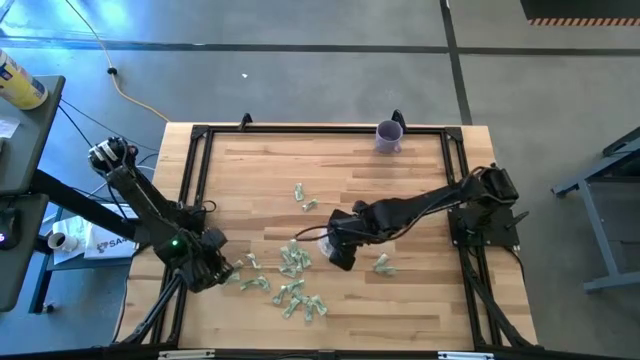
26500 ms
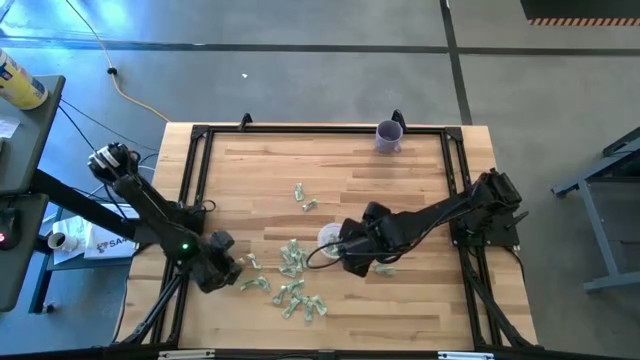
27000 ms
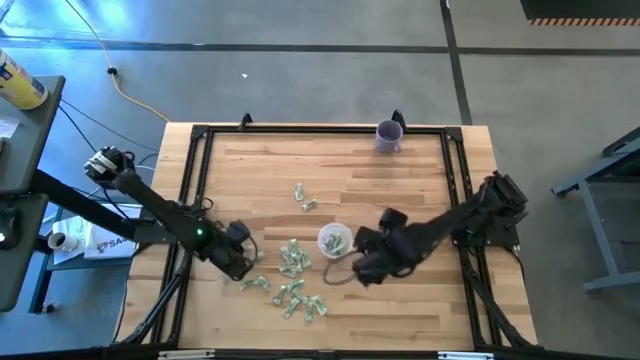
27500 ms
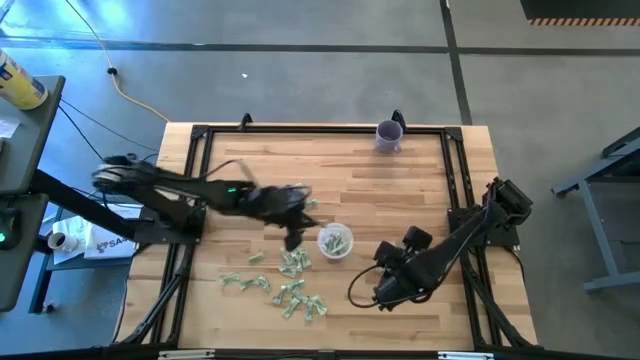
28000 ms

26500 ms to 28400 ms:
Task: Pick and place Stevia / Truvia into bins
Put the stevia packet into the bin

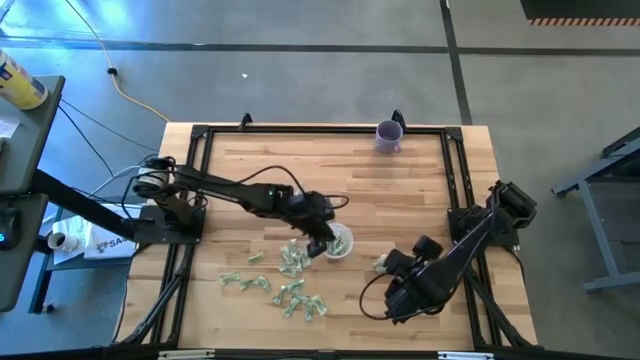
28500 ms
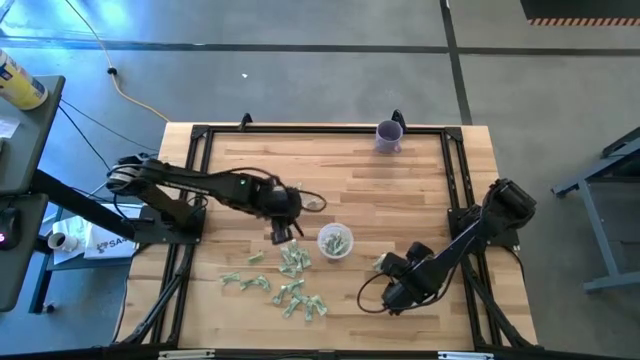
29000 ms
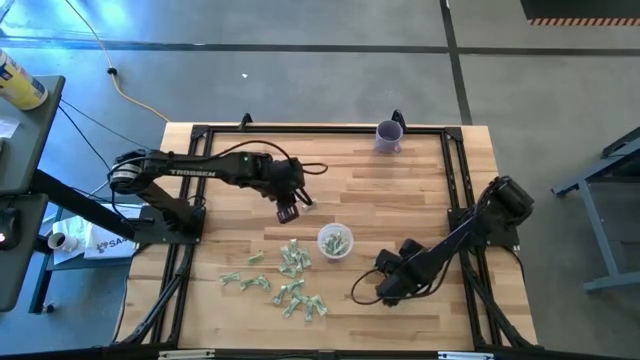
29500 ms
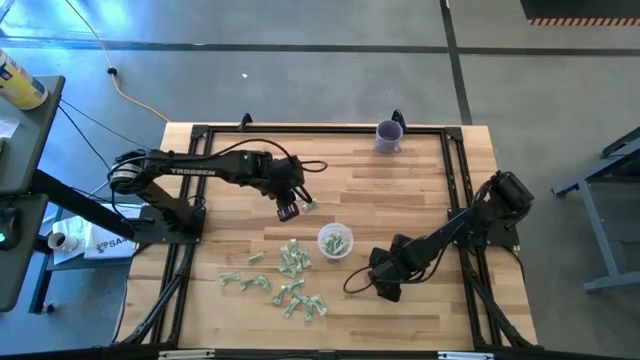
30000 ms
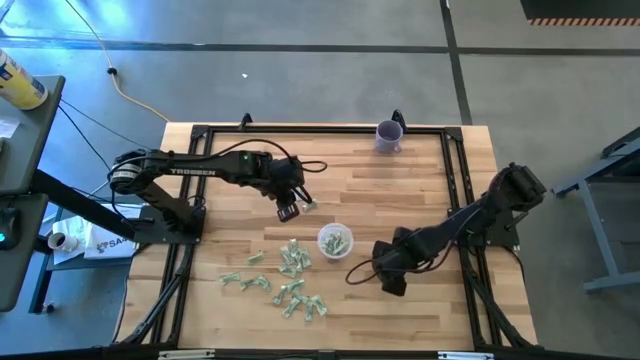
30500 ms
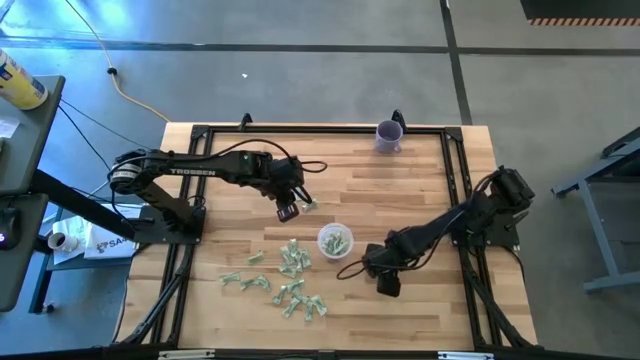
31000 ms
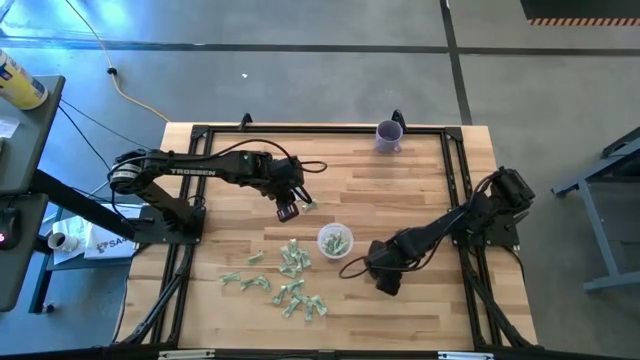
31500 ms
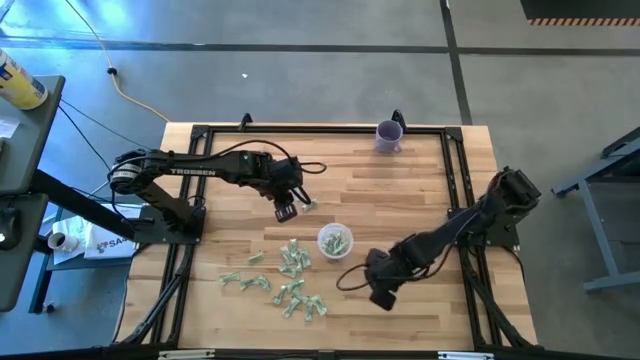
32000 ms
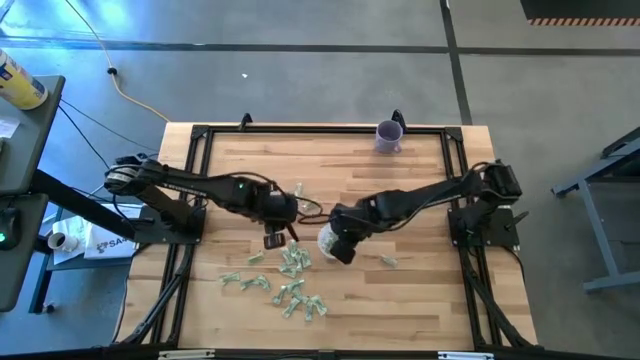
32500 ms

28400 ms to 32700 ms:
Put the stevia packet into the bin

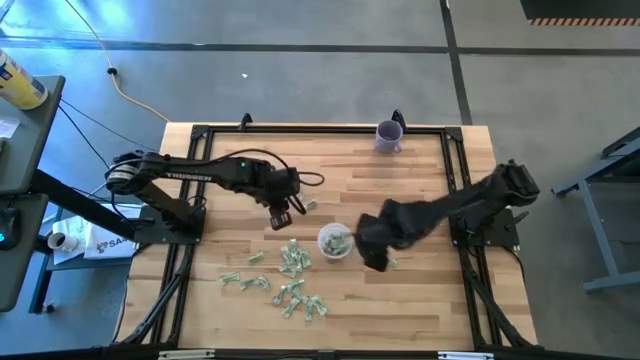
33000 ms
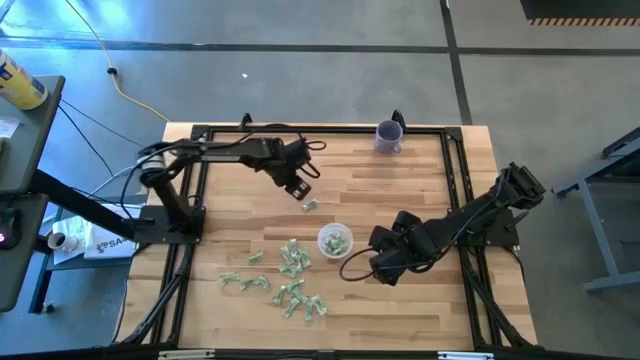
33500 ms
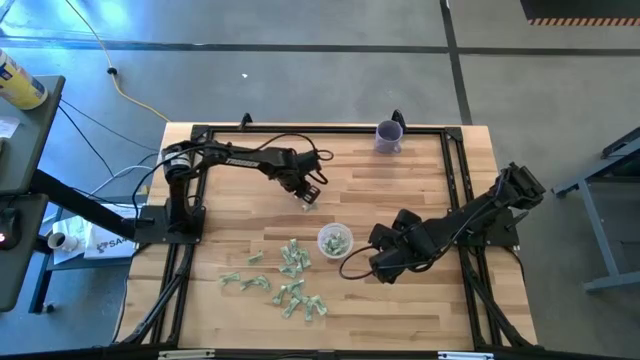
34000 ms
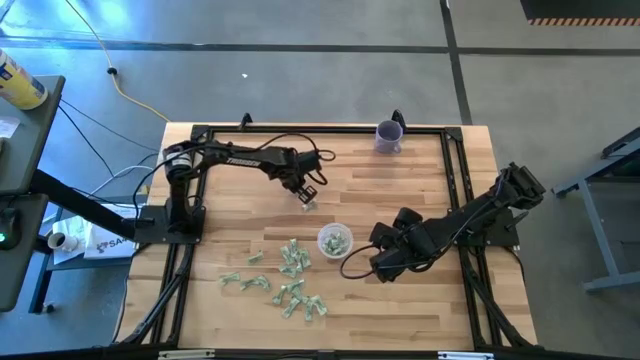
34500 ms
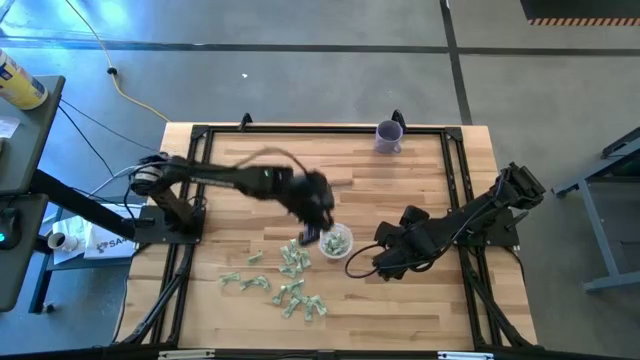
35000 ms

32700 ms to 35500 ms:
Put the stevia packet into the bin

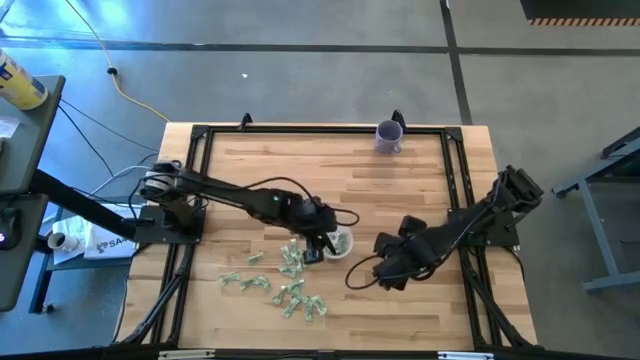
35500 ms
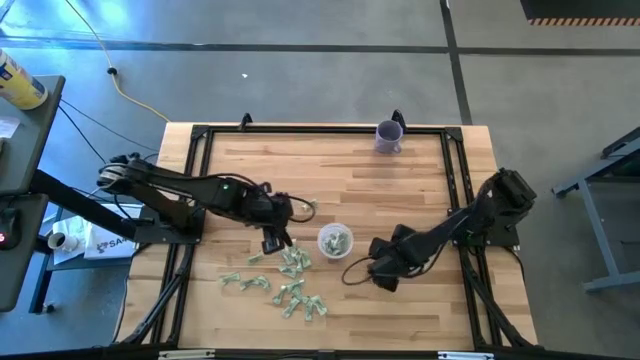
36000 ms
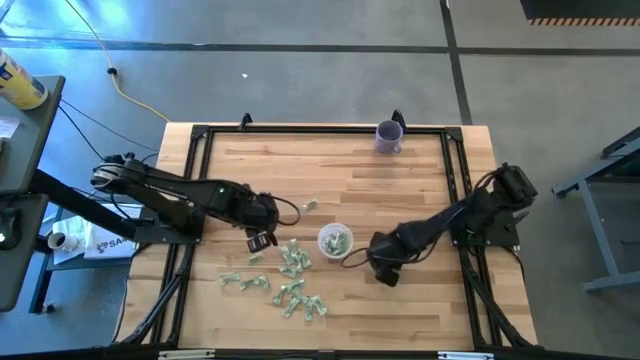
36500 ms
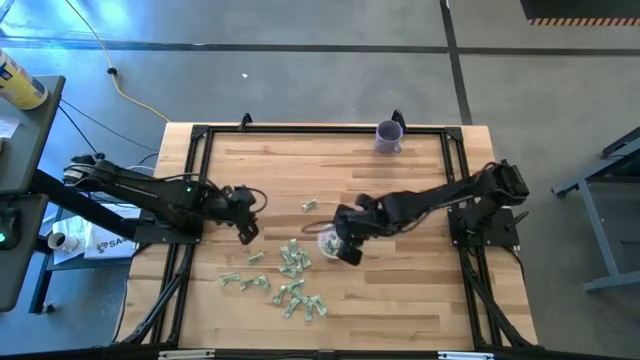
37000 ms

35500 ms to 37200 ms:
Put the stevia packet into the bin

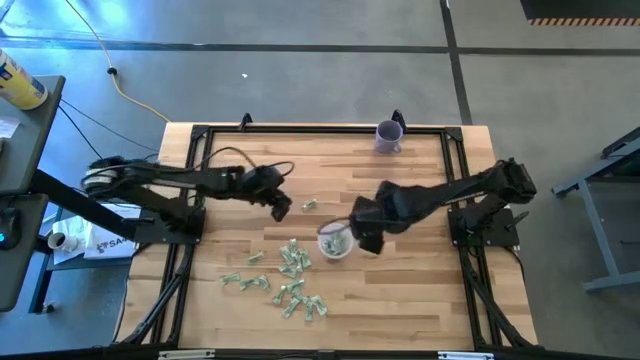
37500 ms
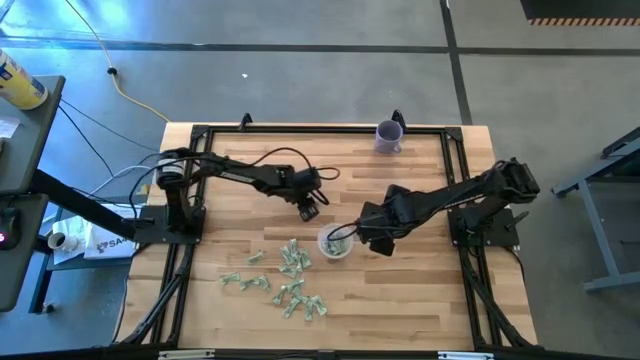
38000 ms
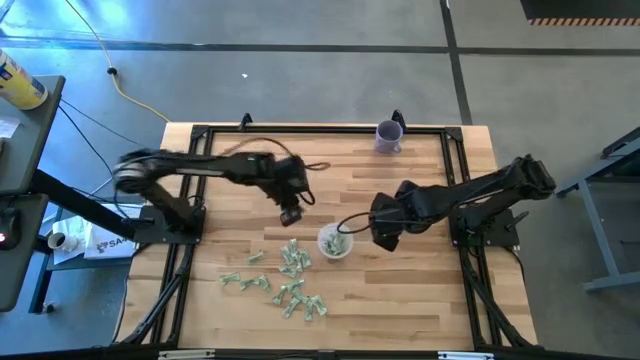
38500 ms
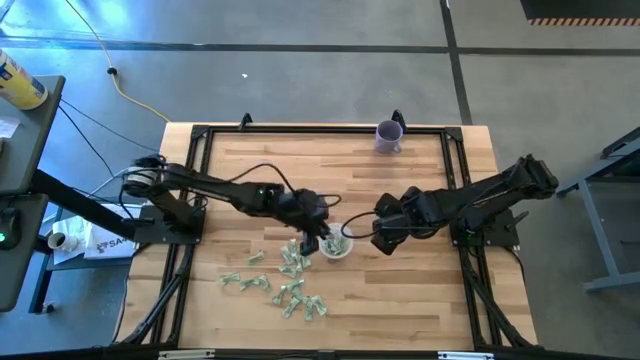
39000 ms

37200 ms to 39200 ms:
Put the stevia packet into the bin

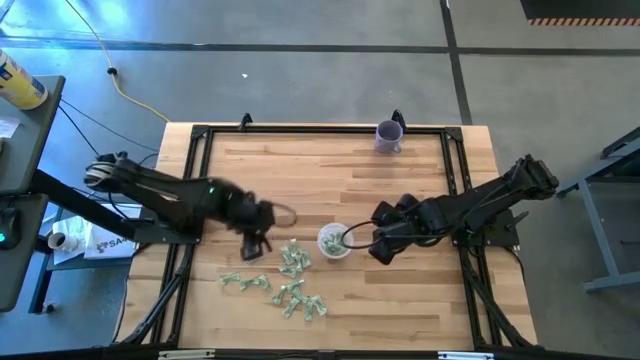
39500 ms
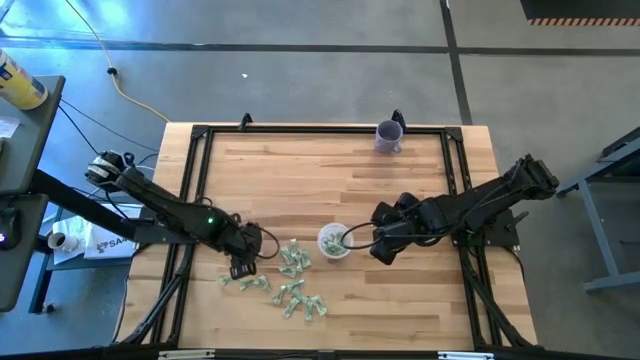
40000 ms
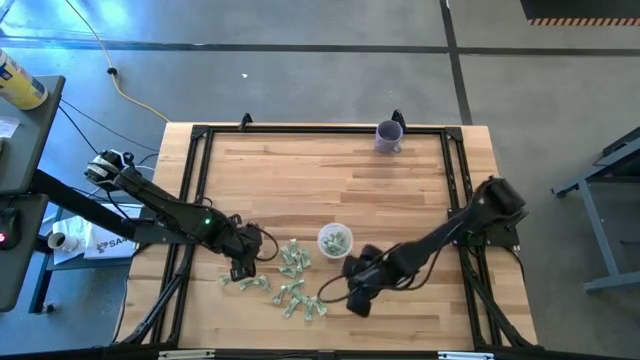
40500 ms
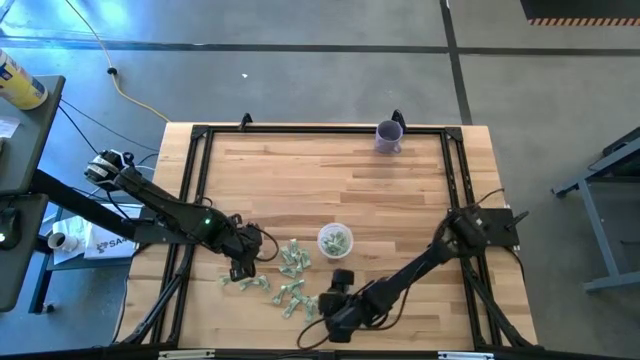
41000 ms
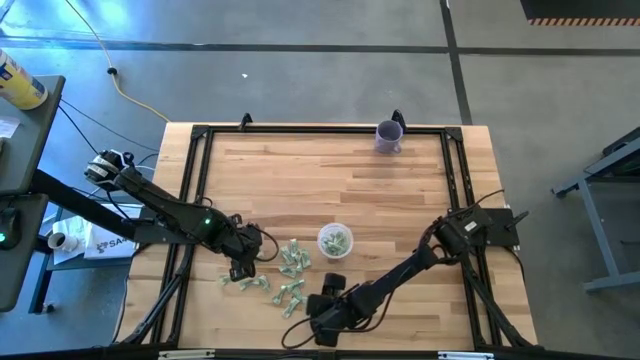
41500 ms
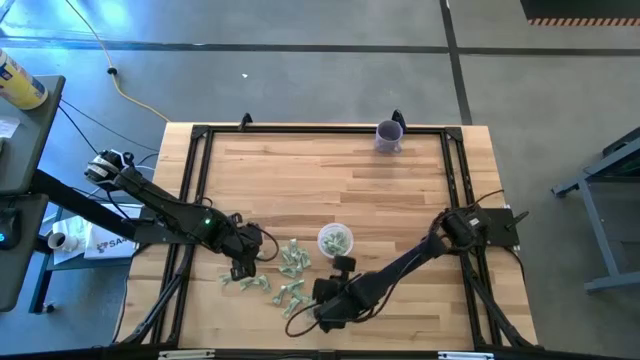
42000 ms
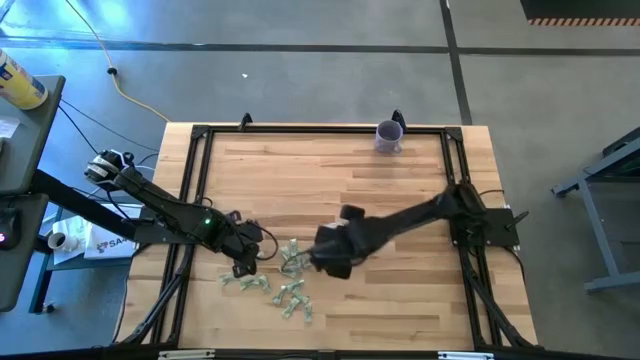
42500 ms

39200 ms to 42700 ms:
Put the stevia packet into the bin

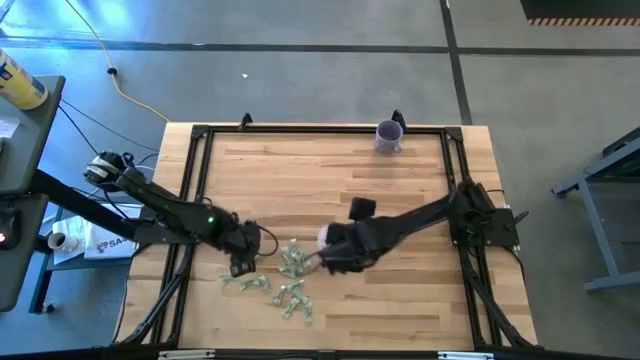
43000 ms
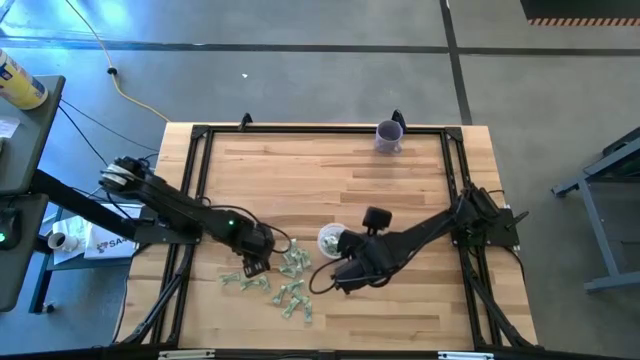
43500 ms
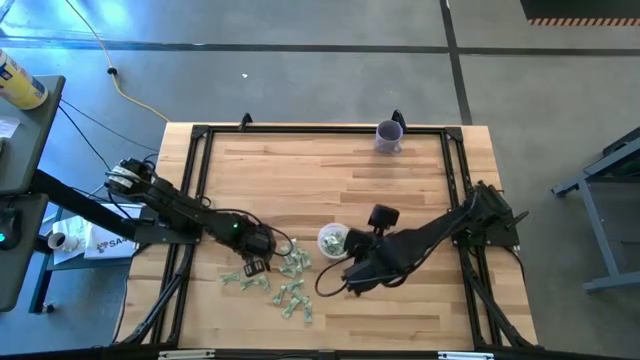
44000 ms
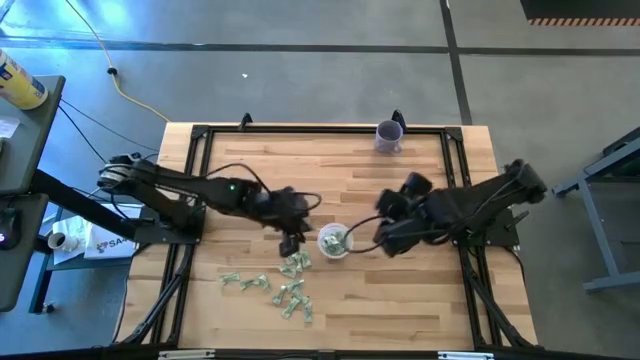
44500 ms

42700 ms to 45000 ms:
Put the stevia packet into the bin

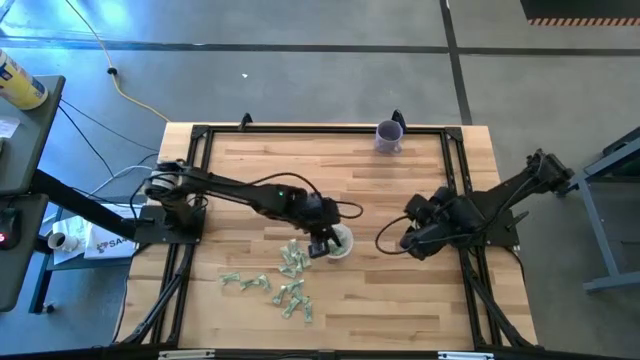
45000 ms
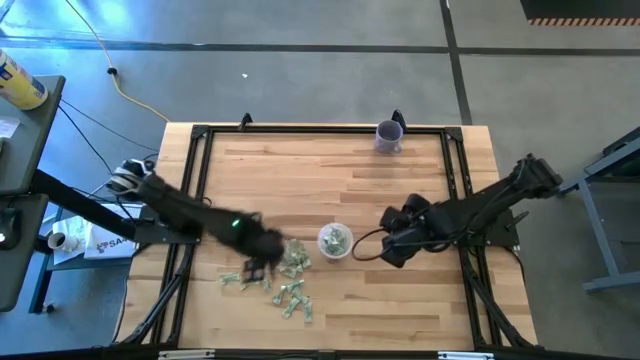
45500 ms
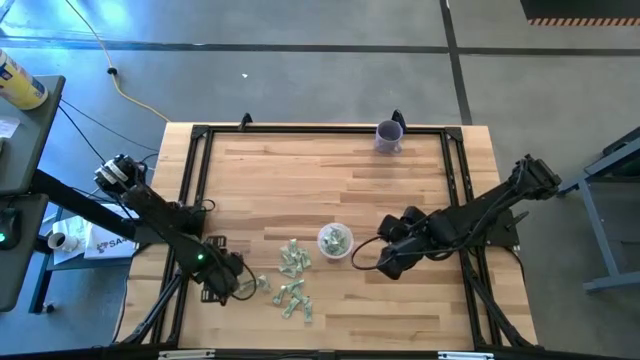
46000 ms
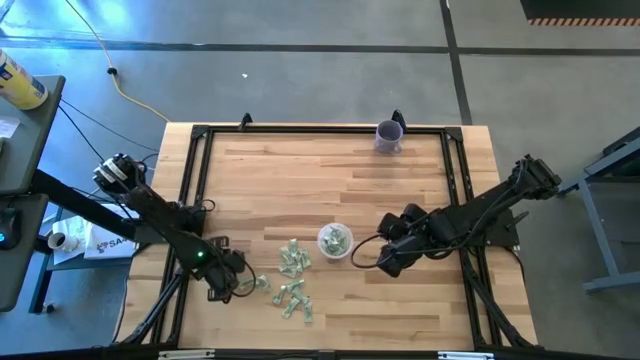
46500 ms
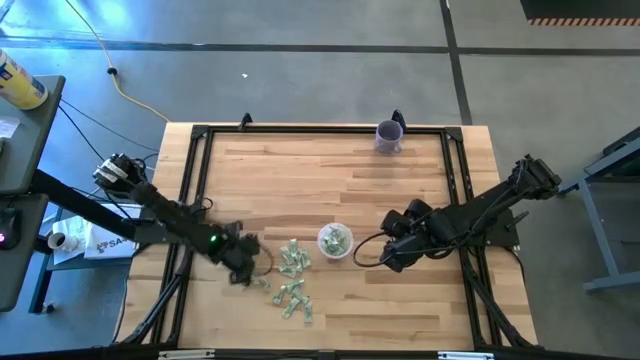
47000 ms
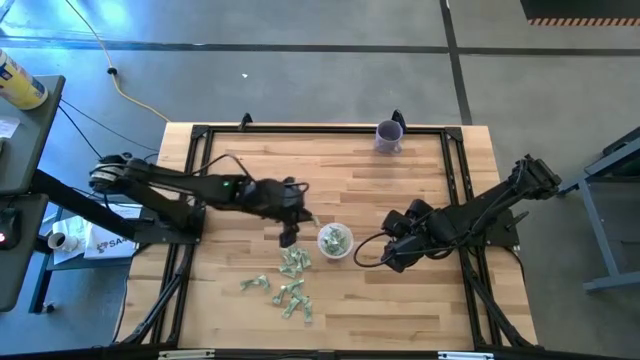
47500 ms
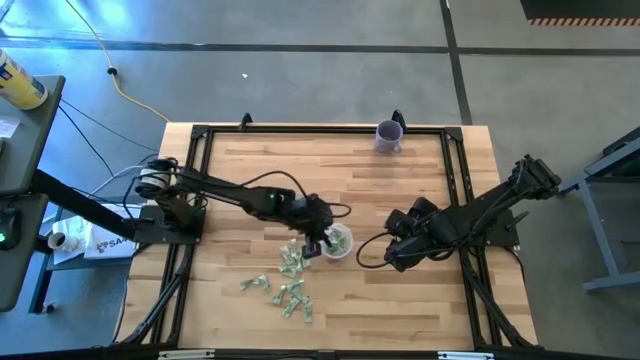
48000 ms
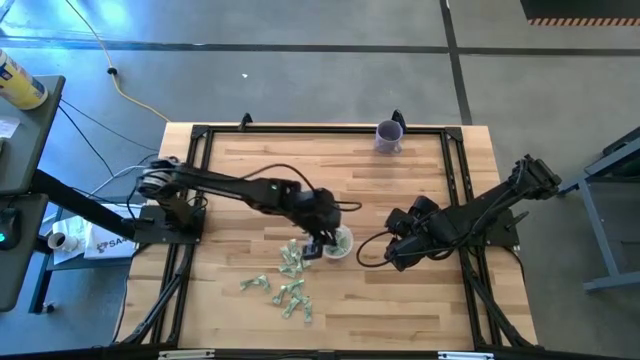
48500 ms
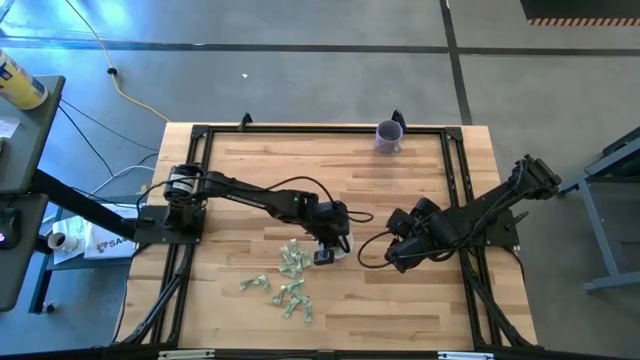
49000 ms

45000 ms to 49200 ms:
Put the stevia packet into the bin
